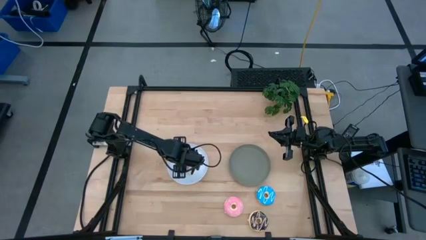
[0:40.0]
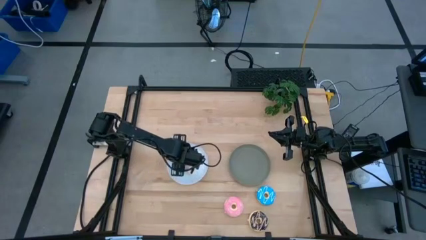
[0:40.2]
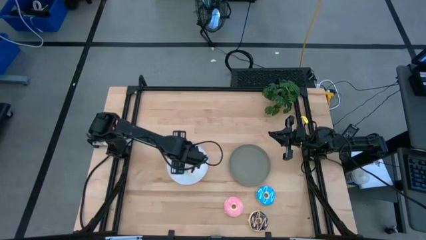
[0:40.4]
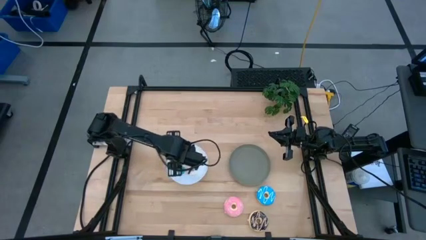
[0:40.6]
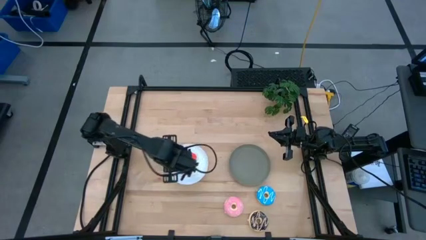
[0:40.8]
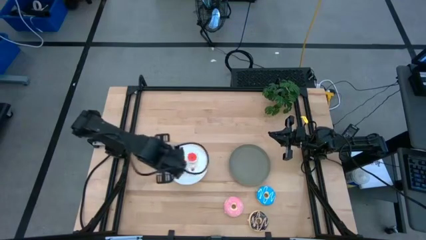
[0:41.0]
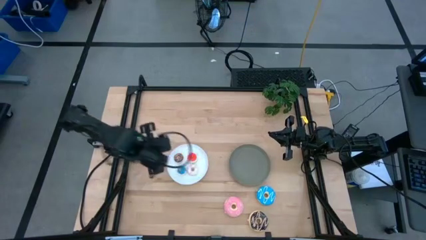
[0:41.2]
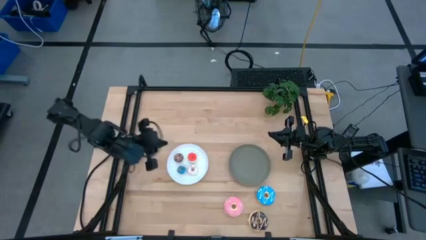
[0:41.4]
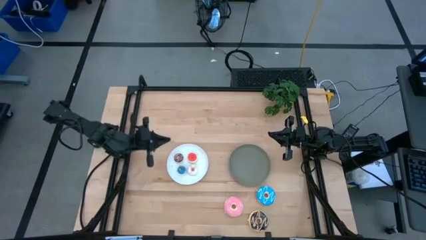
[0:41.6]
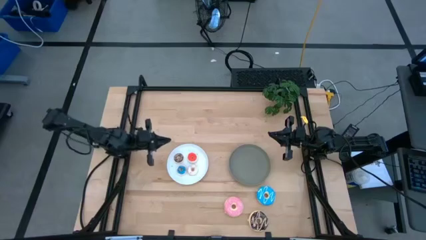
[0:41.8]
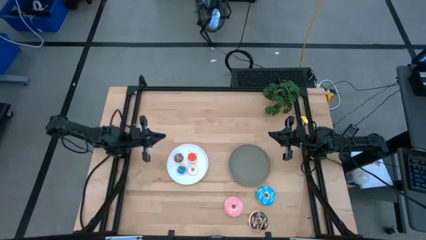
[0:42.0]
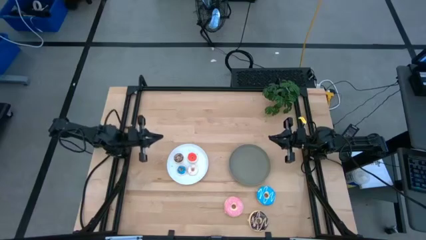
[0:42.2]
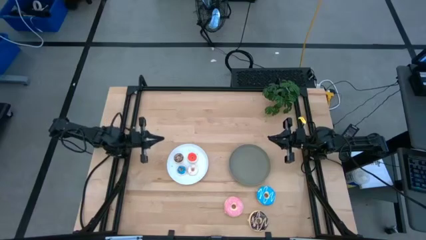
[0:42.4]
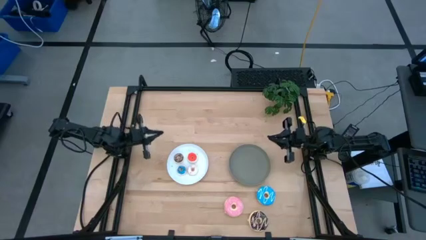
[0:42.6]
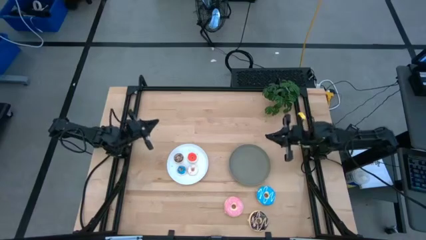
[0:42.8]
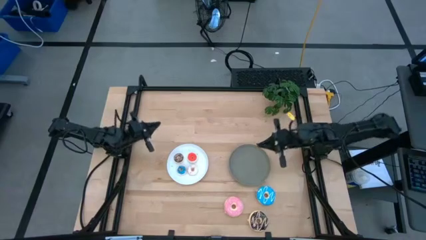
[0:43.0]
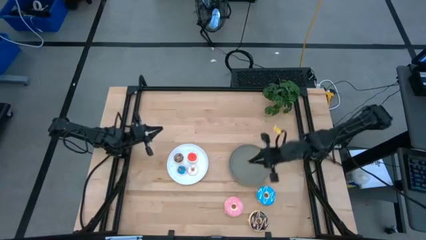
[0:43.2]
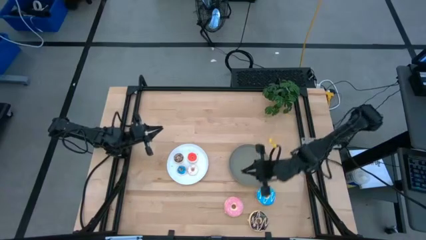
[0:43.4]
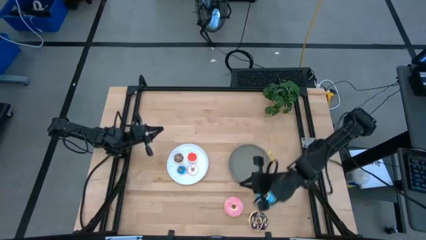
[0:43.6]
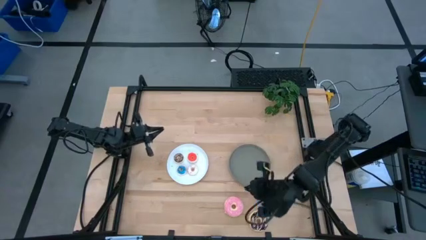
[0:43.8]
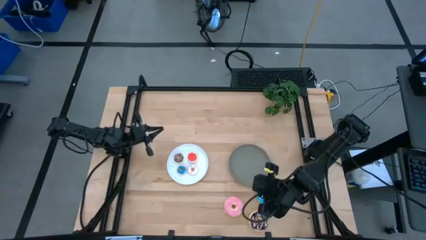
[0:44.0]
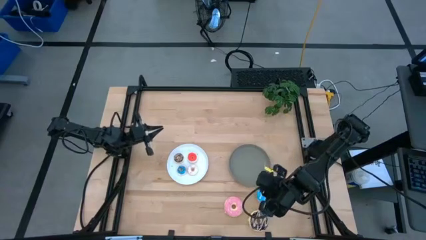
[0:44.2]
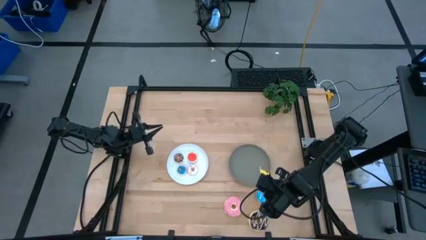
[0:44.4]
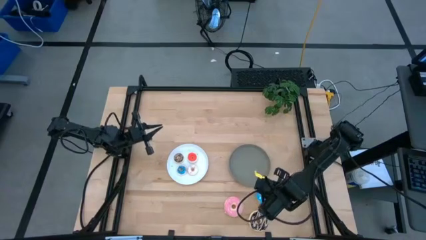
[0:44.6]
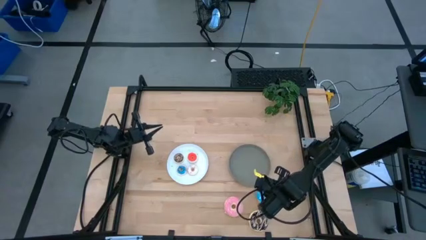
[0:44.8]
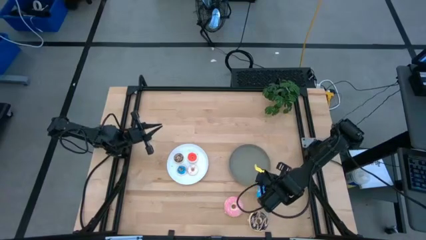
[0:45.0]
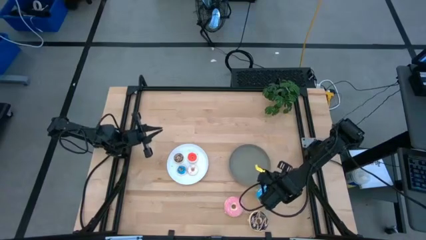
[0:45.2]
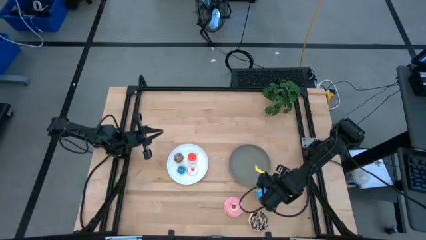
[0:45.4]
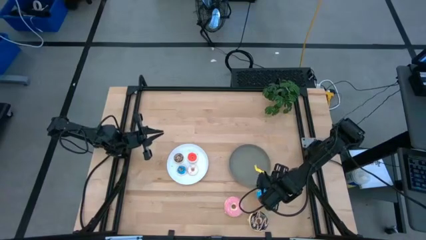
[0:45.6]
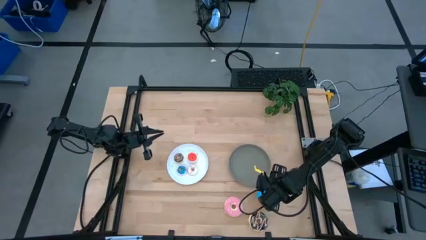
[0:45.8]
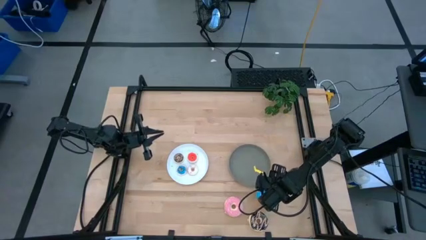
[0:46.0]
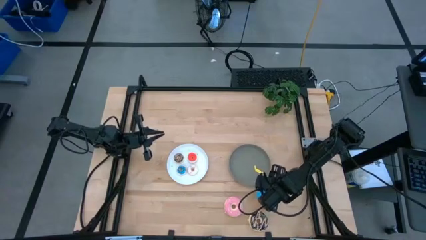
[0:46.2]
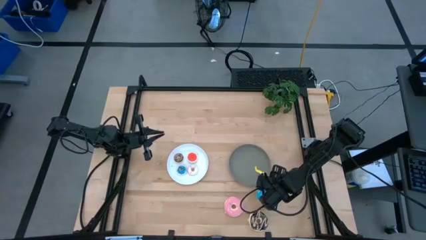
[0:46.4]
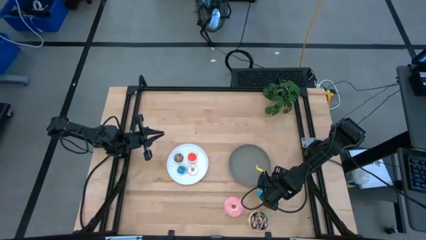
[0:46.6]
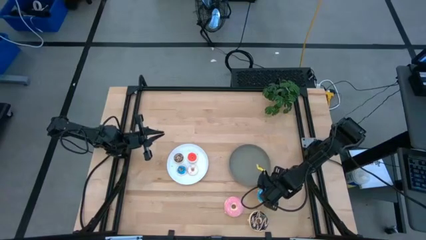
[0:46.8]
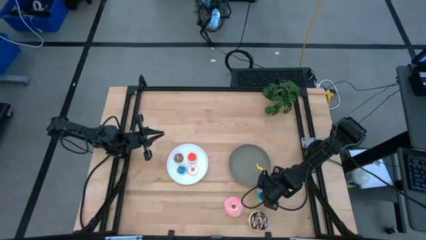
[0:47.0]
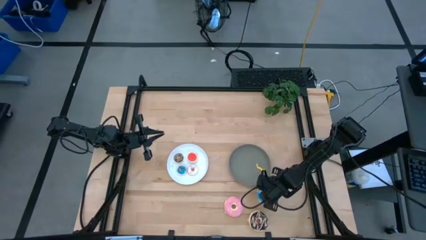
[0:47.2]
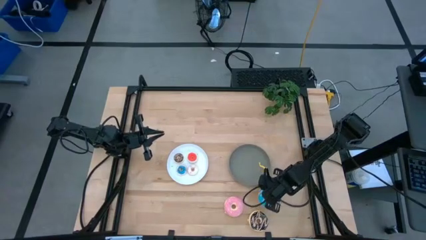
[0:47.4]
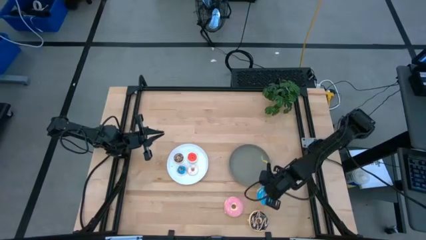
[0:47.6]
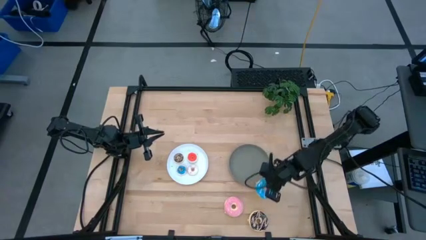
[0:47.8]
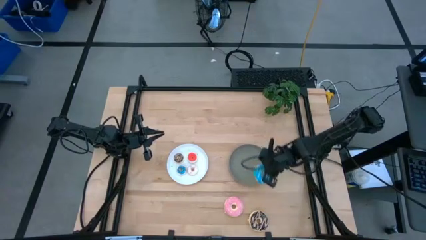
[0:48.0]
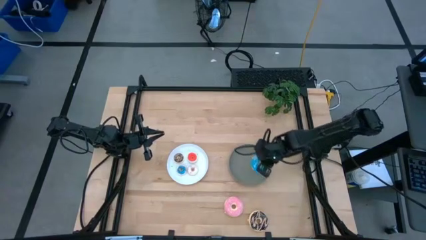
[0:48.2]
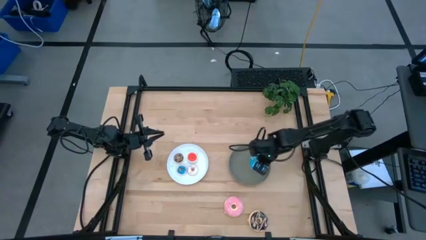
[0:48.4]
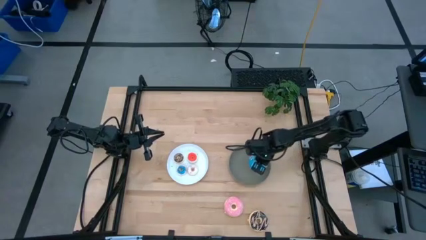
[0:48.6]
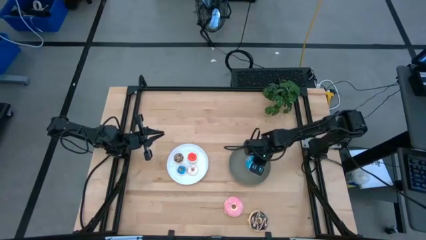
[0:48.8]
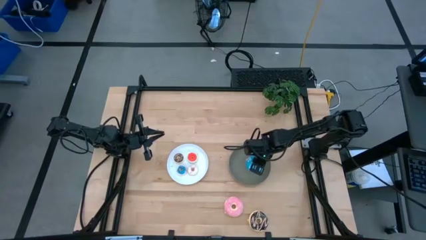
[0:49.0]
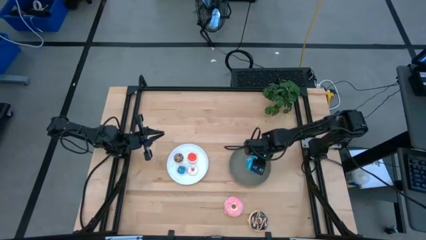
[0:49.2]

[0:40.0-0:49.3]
Task: Pick & Place donuts
Put the large blue and white donut on the gray plate

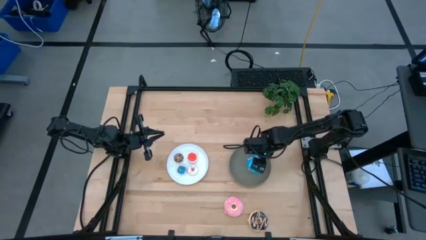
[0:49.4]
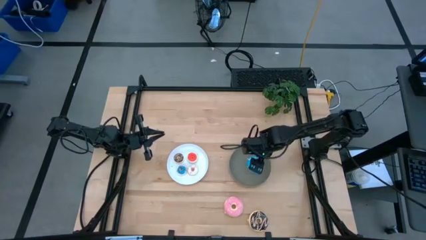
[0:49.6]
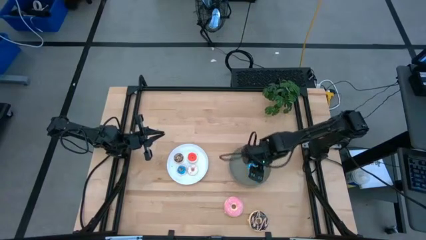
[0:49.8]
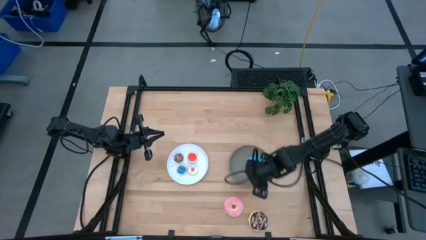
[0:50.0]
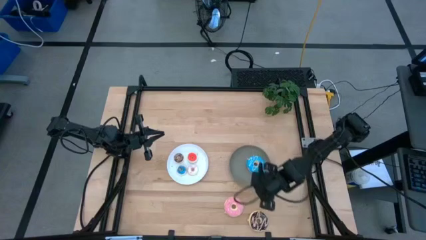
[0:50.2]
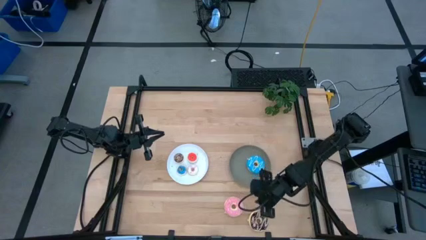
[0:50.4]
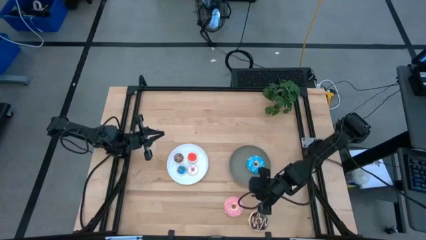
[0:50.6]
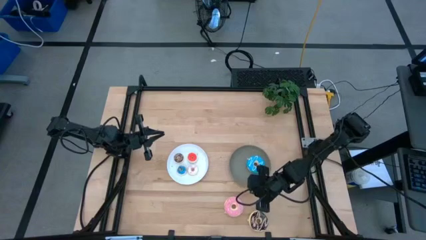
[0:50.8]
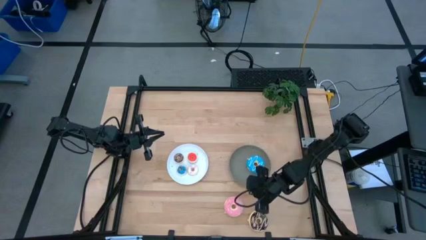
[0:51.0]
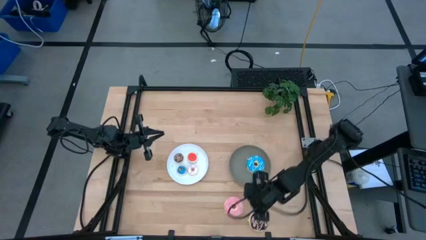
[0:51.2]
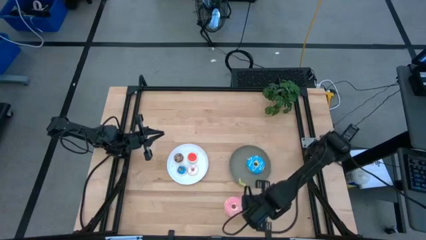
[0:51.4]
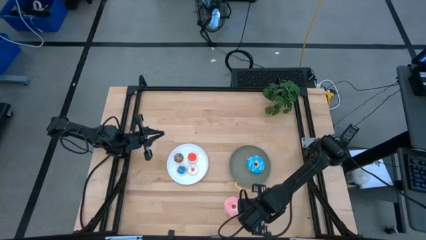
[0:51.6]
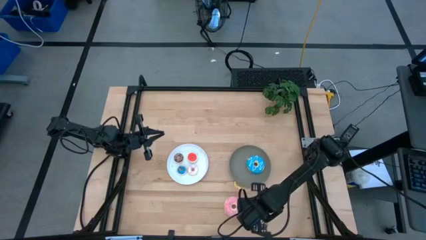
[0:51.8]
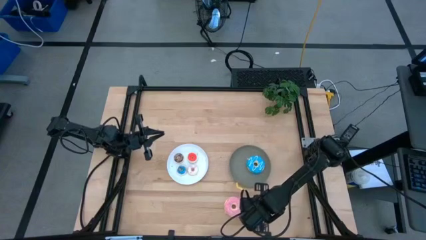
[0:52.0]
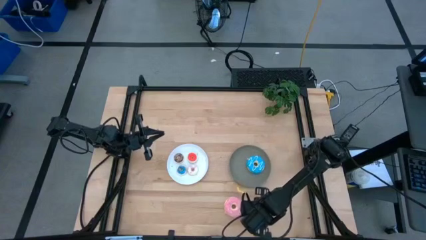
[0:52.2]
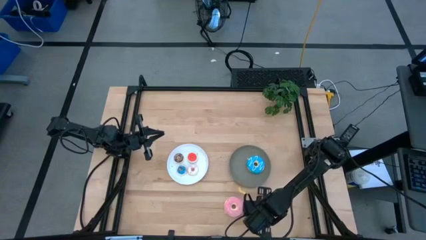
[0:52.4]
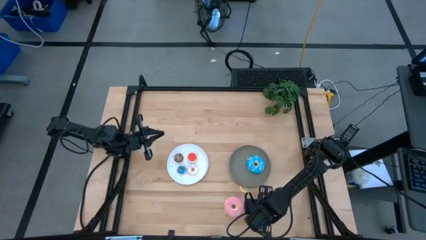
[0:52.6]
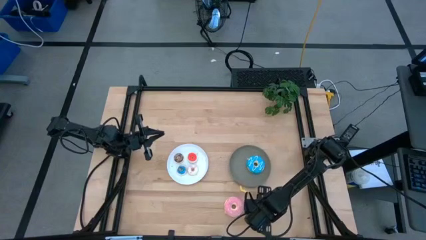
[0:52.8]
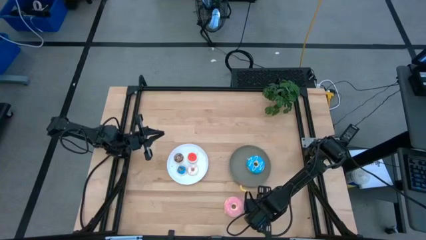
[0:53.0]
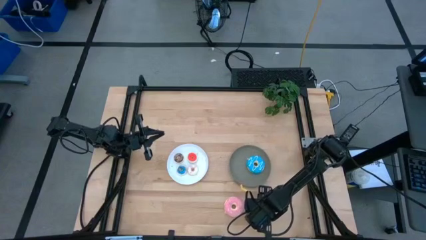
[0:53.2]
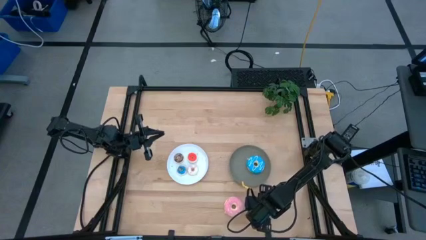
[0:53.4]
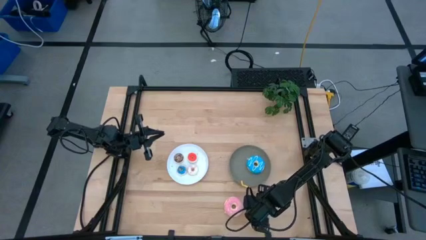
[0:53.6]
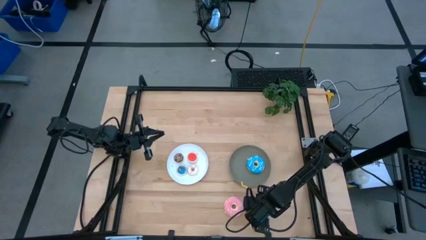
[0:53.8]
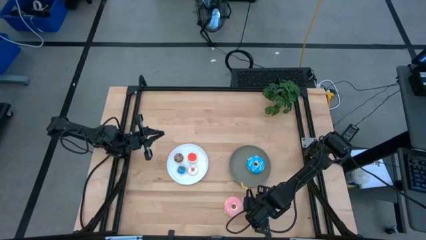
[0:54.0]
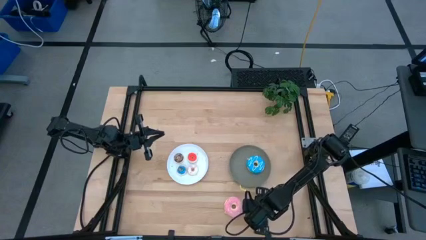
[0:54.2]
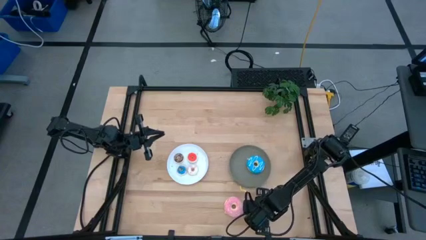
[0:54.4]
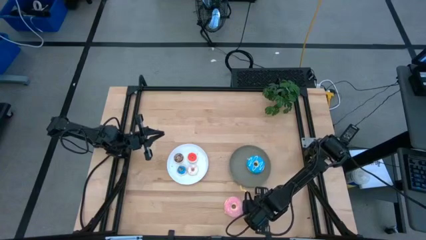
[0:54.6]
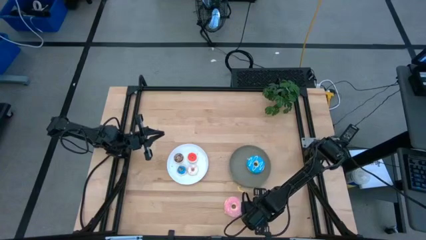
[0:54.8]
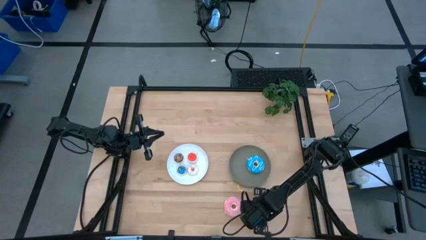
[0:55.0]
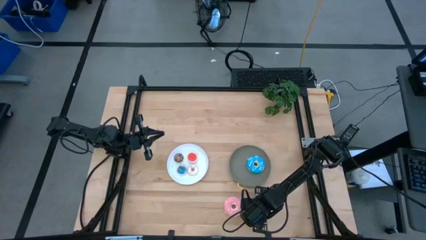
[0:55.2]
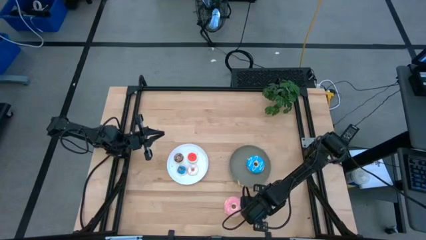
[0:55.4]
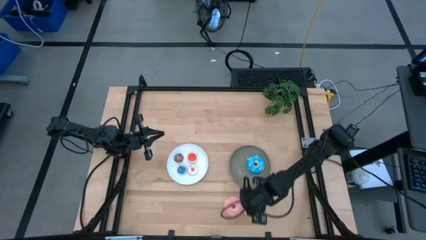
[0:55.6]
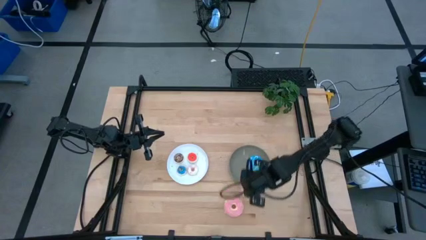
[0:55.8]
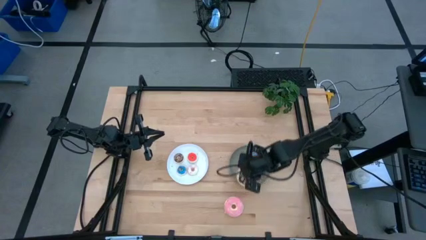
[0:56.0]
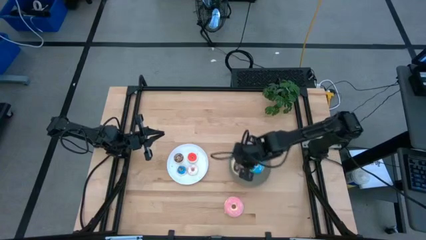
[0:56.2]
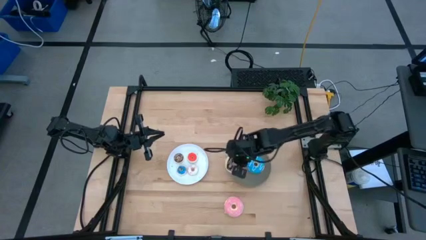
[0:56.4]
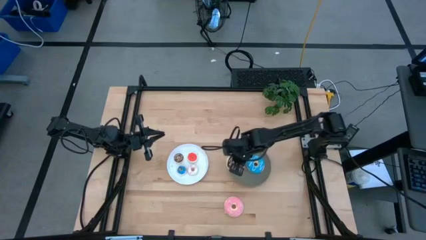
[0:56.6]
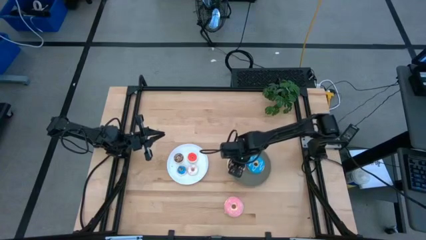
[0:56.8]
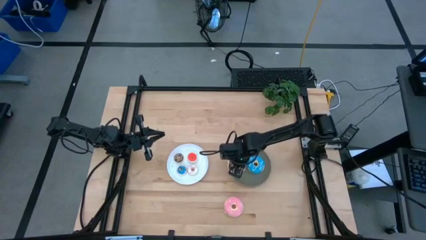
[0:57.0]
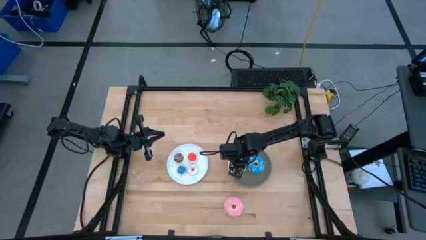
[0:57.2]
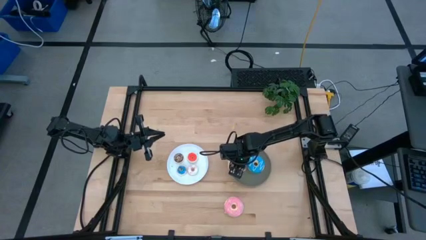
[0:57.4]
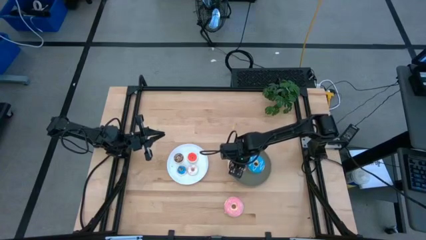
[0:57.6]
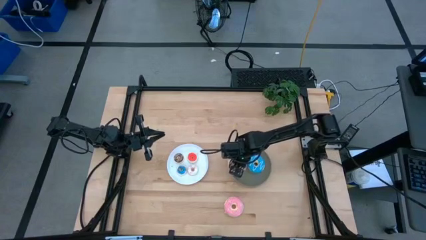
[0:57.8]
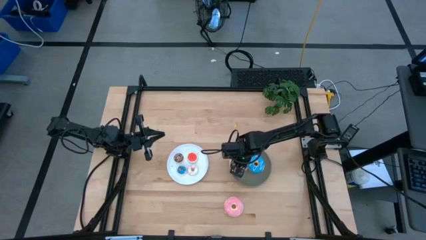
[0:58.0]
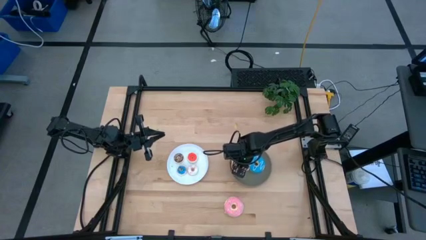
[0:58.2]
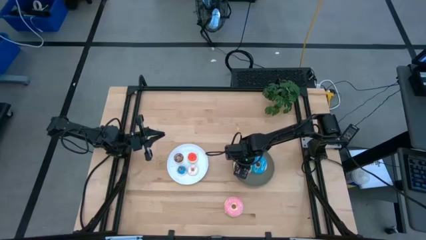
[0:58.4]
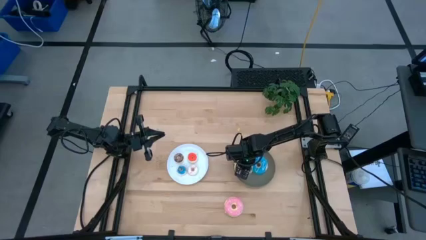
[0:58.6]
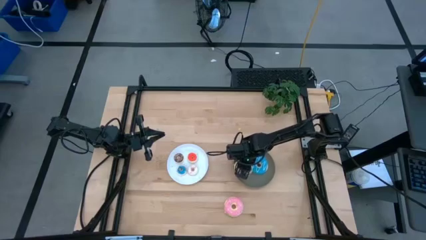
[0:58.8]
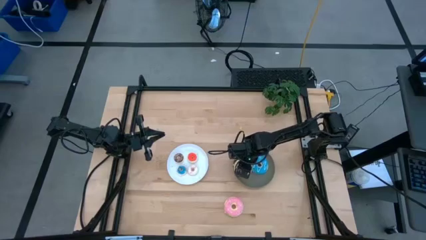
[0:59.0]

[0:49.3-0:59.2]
Put the large black and pink donut on the gray plate
